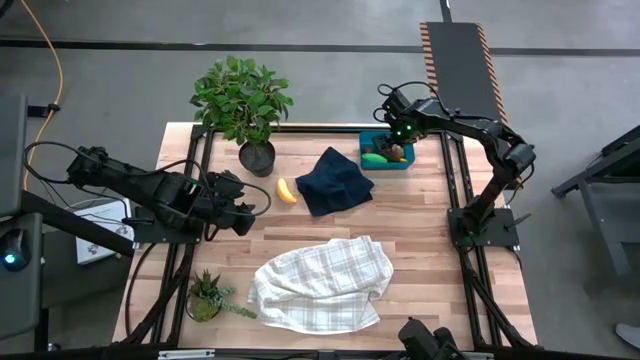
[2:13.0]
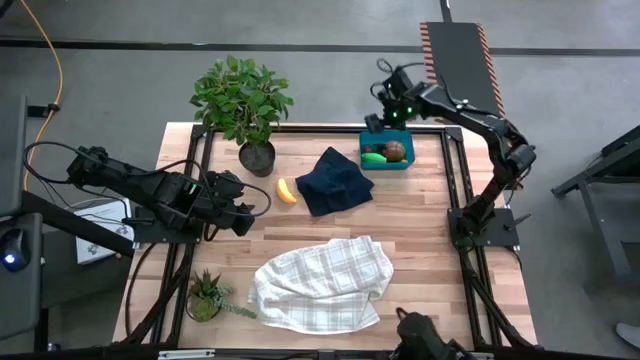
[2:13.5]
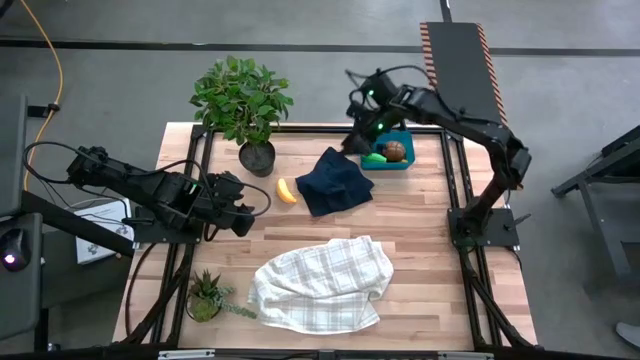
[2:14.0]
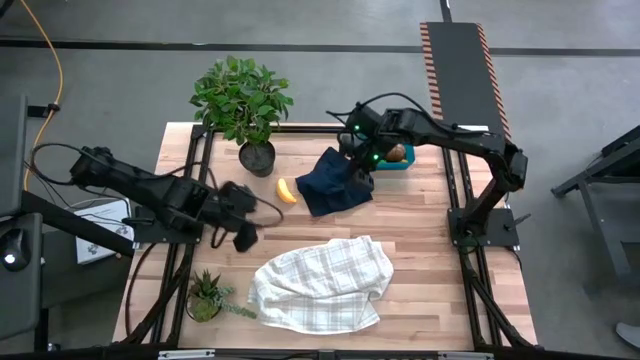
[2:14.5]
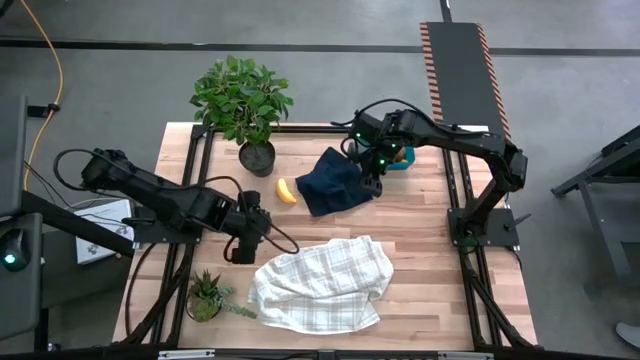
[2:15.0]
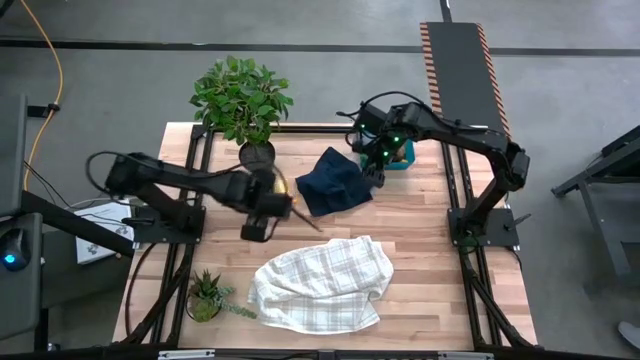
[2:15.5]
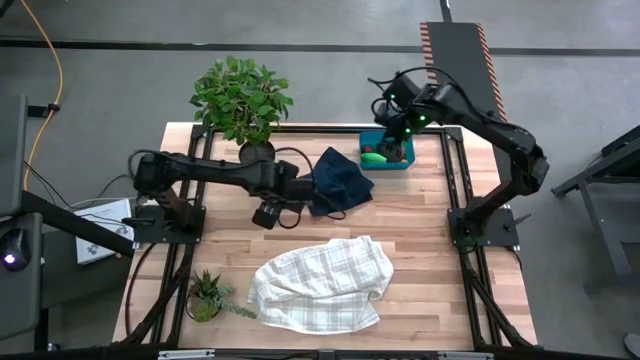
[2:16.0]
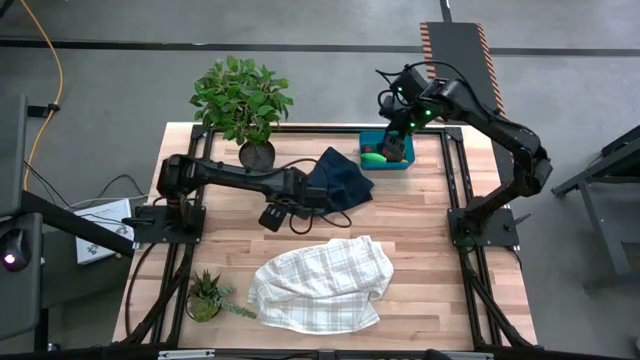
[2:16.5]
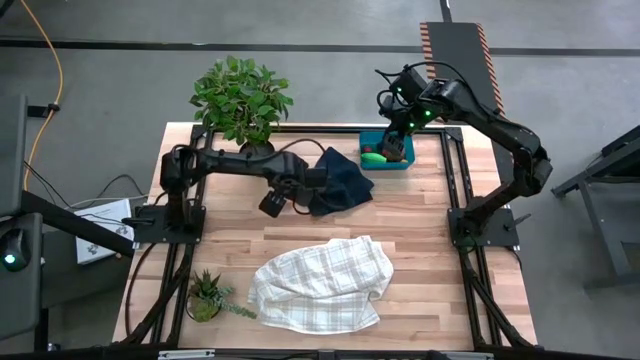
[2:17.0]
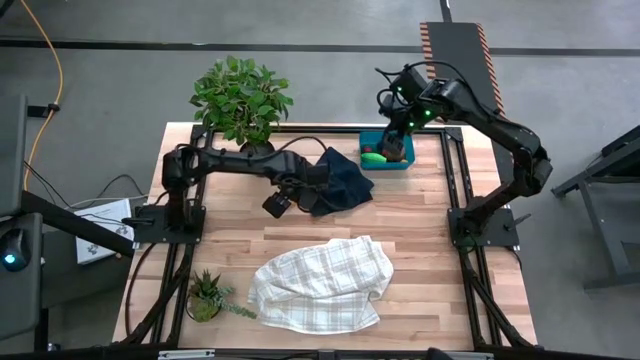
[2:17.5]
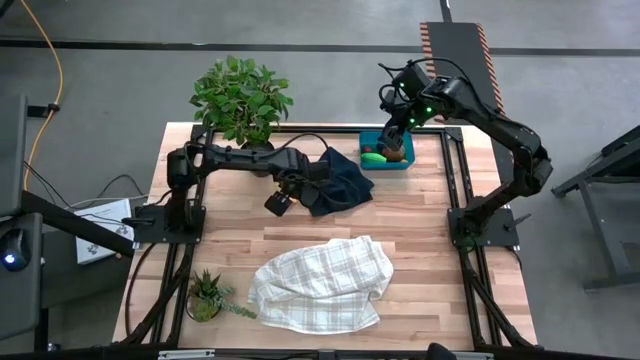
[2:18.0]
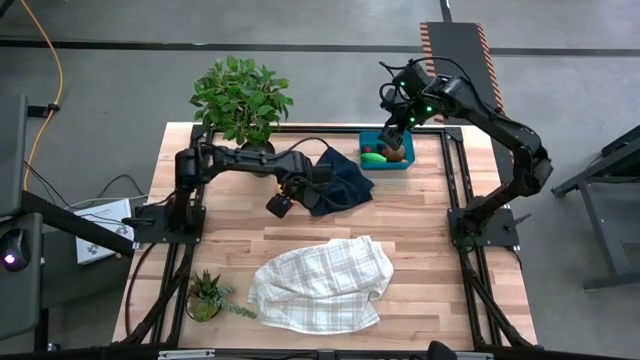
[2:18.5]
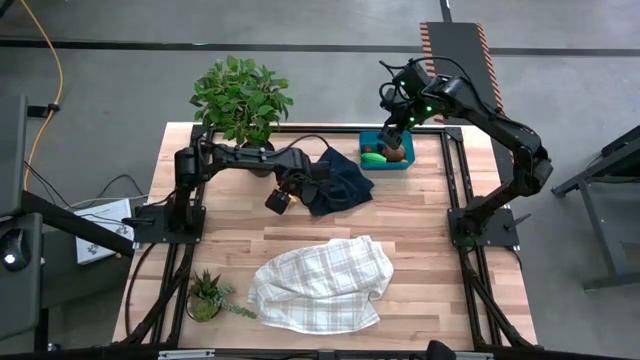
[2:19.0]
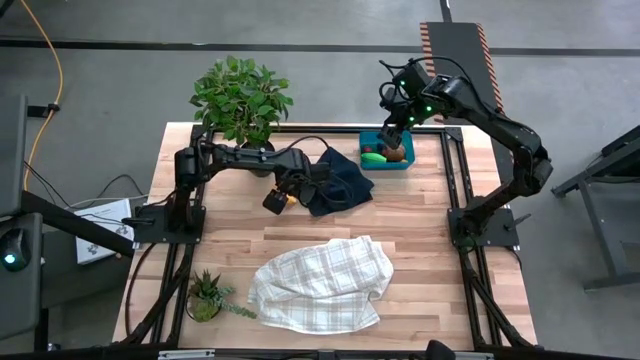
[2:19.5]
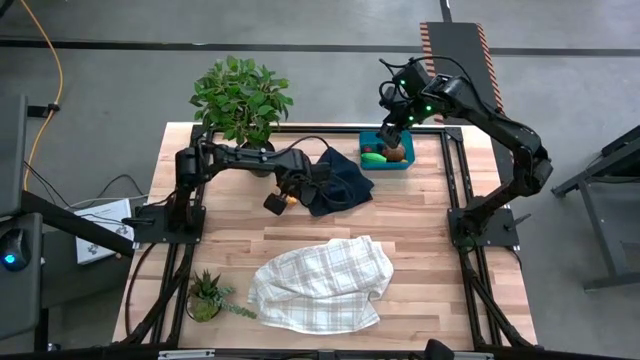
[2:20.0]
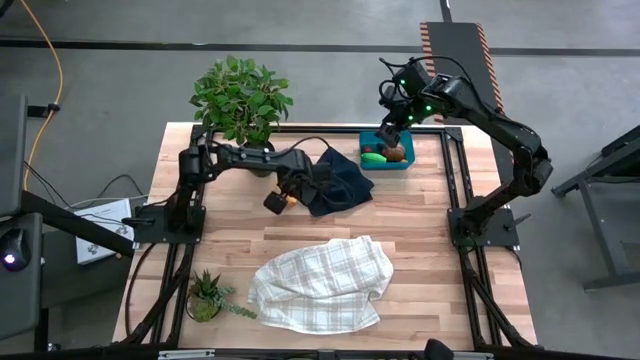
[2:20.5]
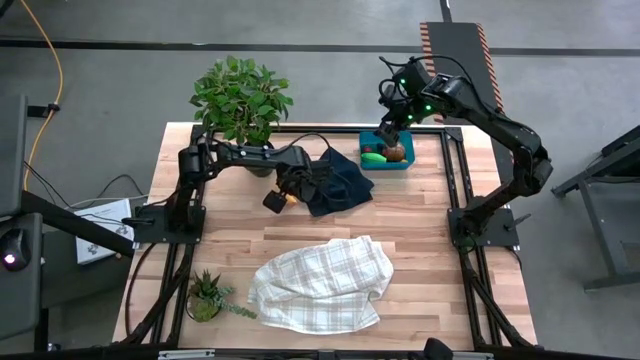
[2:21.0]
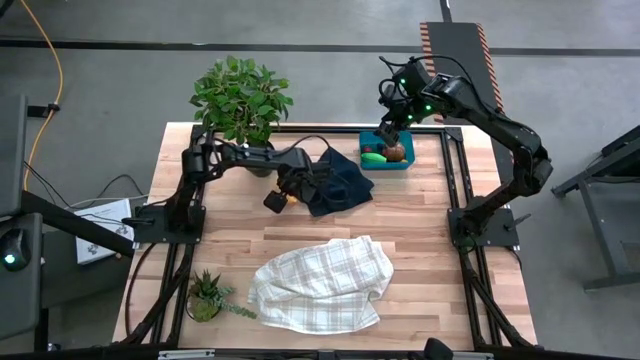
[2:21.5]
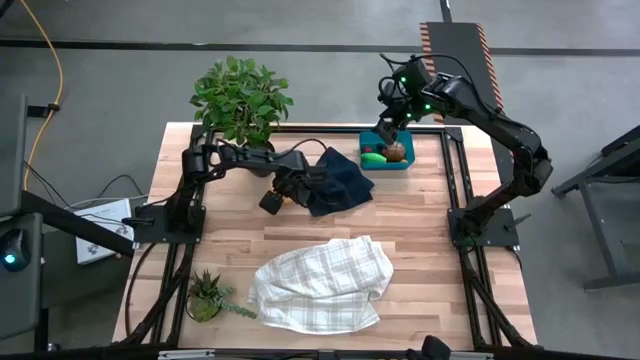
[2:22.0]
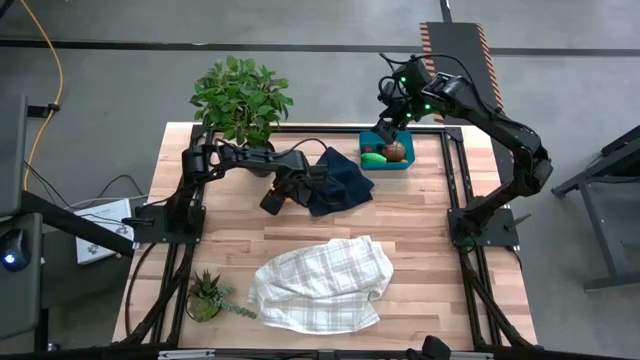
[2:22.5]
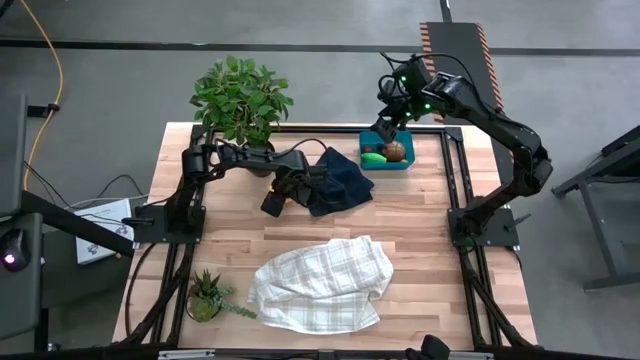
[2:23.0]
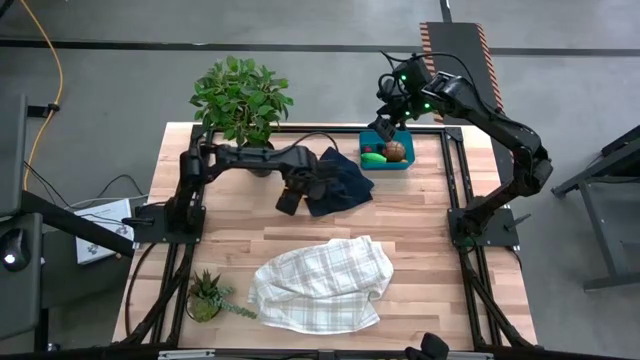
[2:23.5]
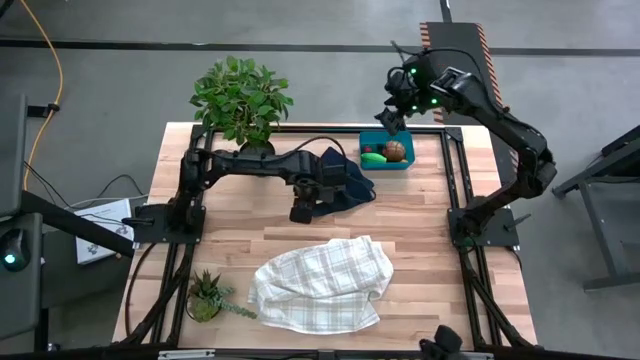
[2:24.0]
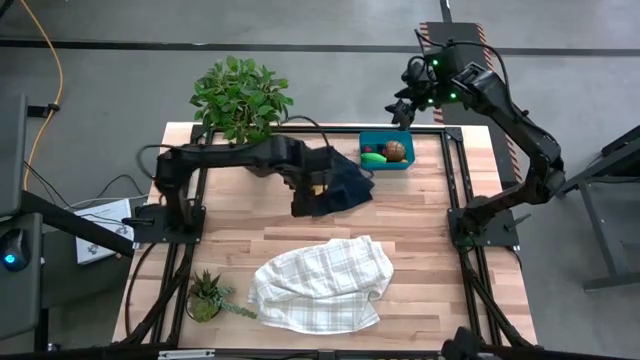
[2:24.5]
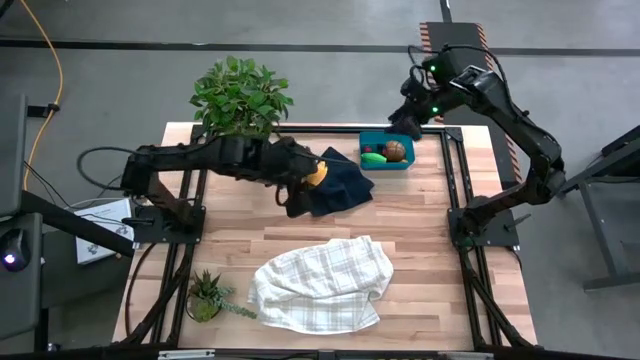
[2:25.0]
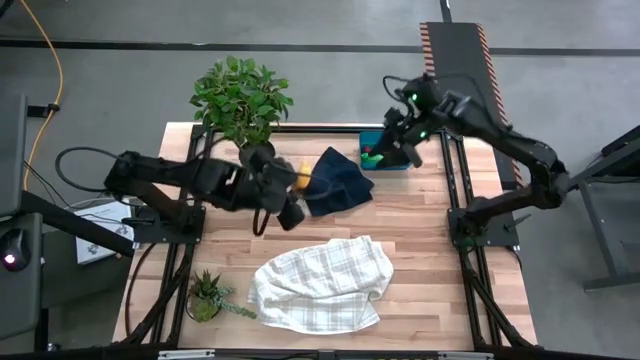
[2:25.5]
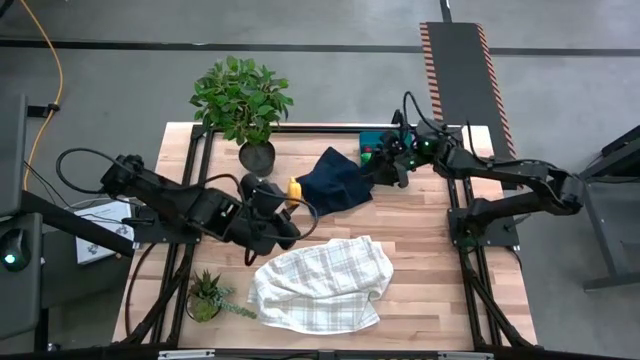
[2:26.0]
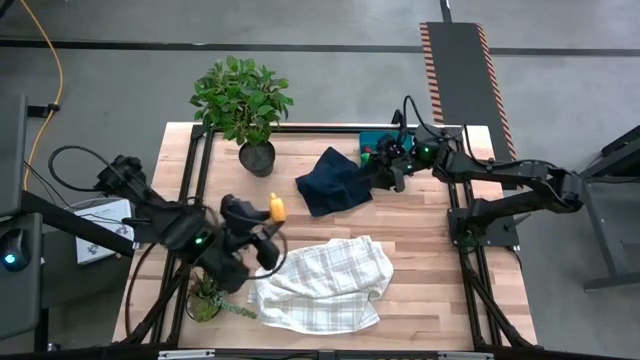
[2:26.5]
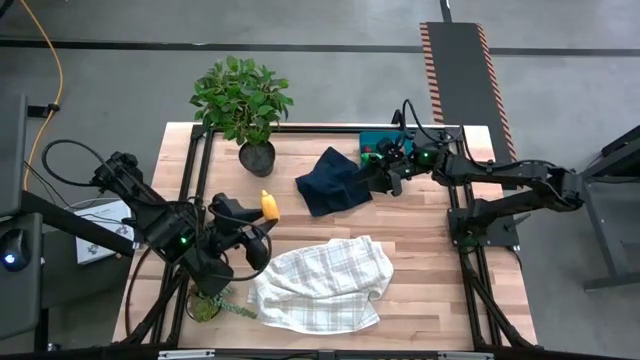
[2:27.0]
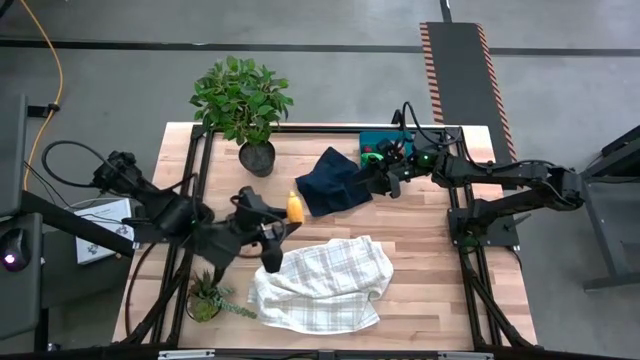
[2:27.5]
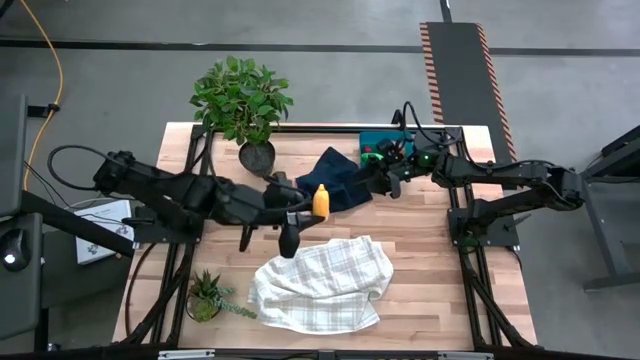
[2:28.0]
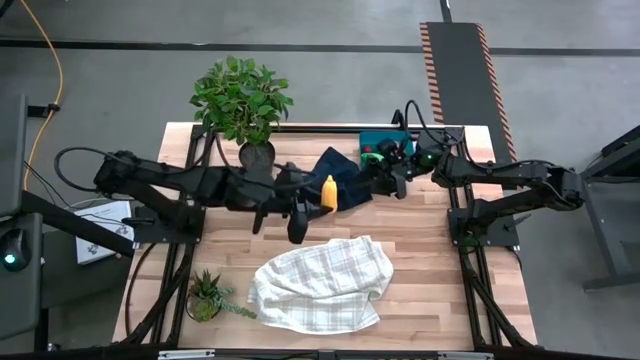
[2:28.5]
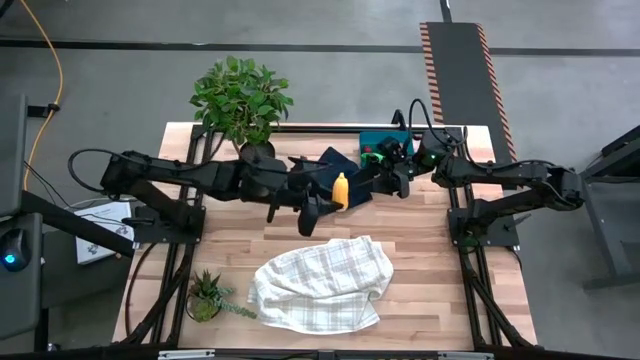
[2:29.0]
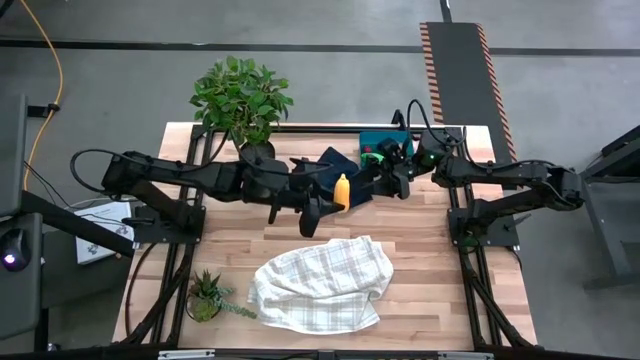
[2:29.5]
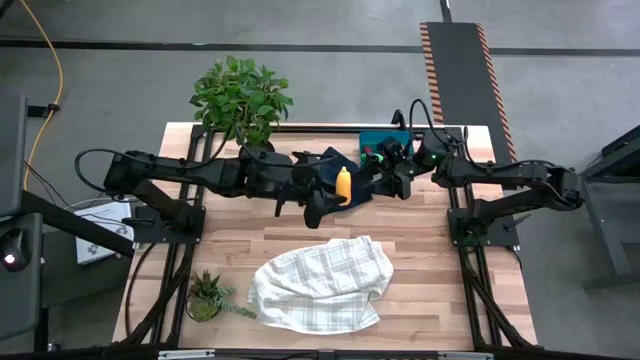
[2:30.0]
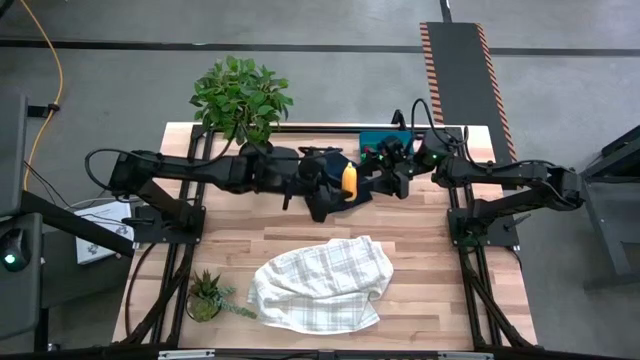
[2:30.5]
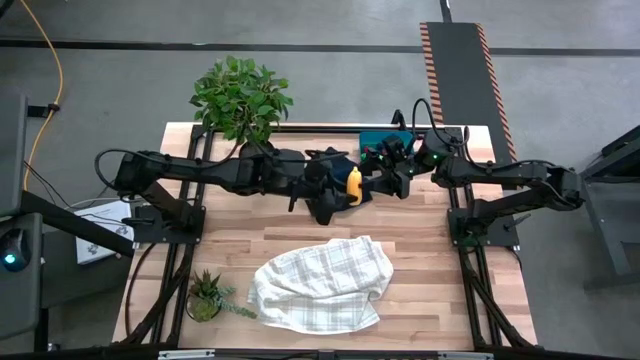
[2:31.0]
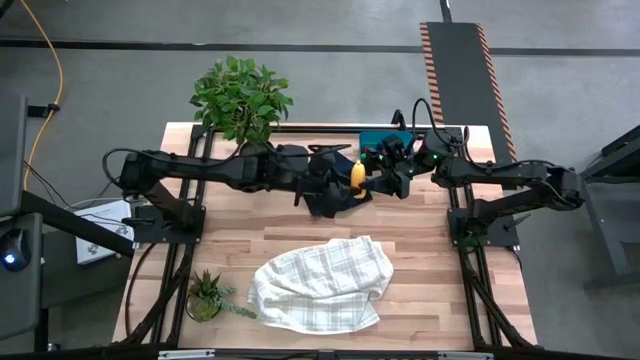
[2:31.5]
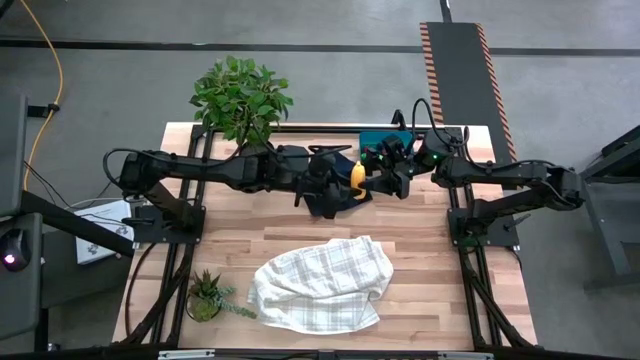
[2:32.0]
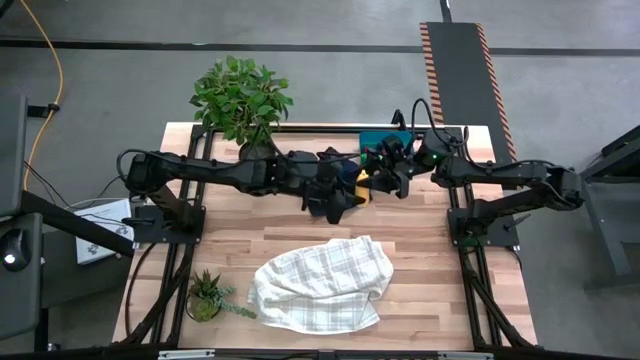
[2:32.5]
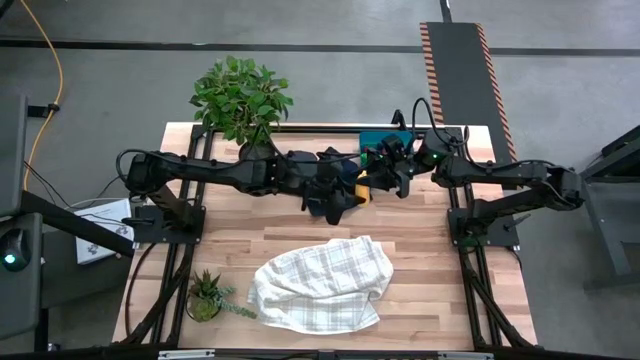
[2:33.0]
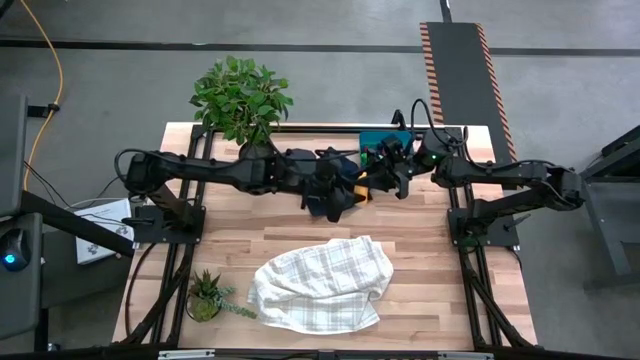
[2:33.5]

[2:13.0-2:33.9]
Task: Pick and placing Produce into tupperware
Put the yellow banana into the blue bin
